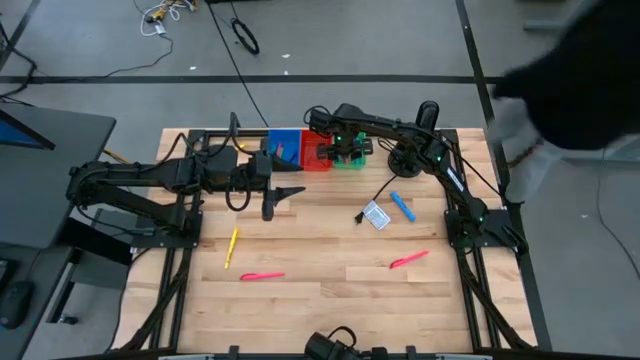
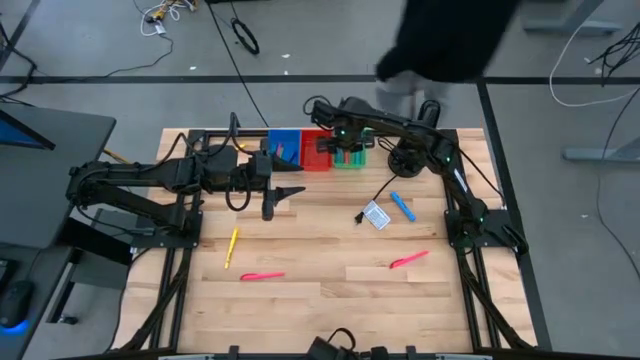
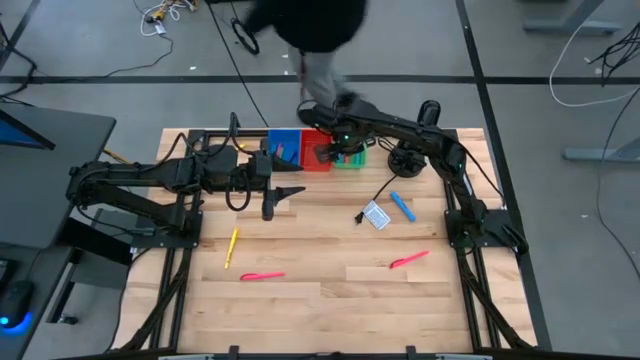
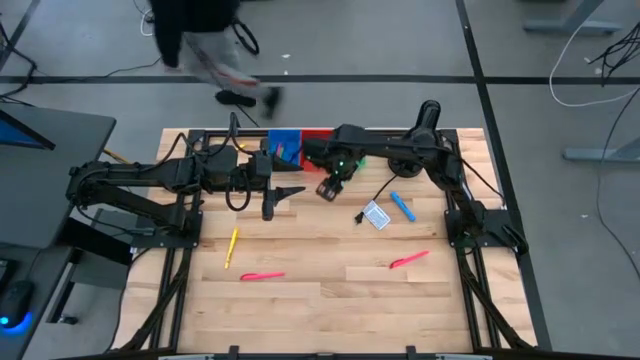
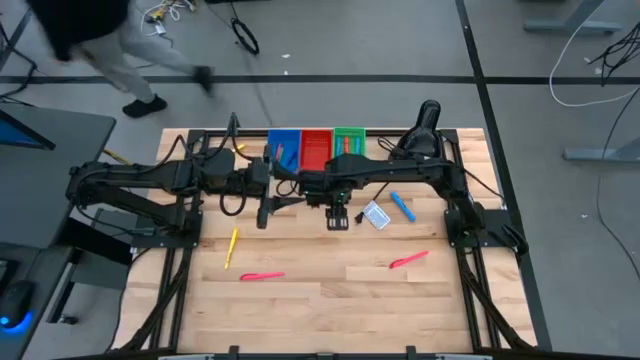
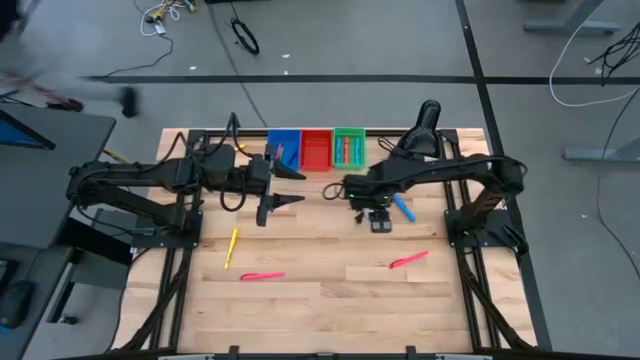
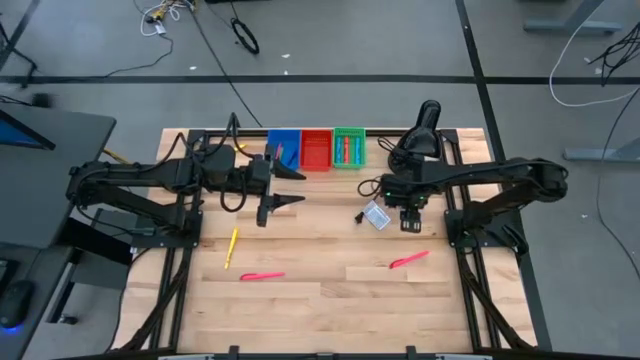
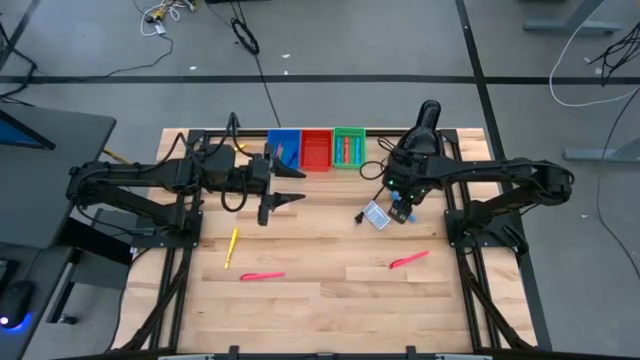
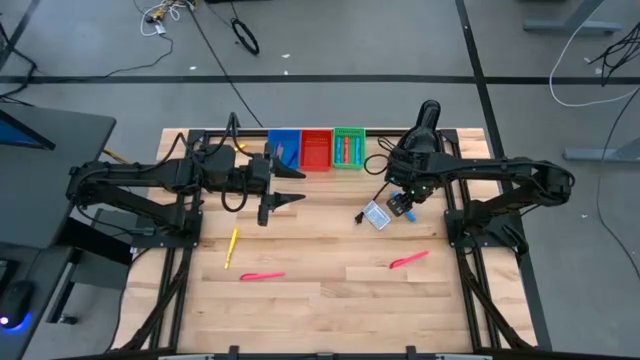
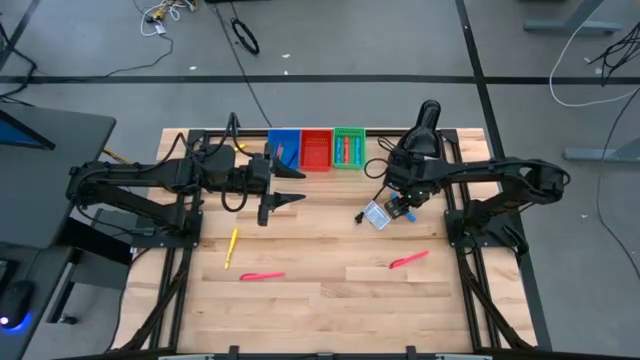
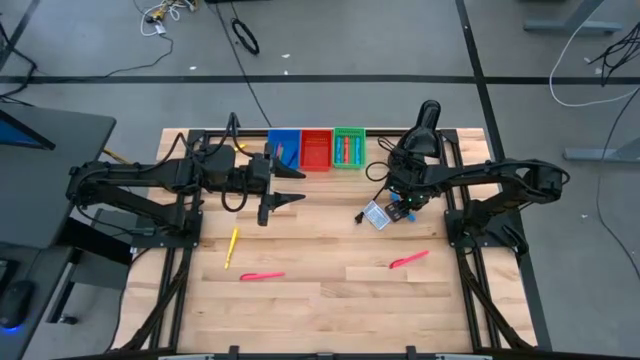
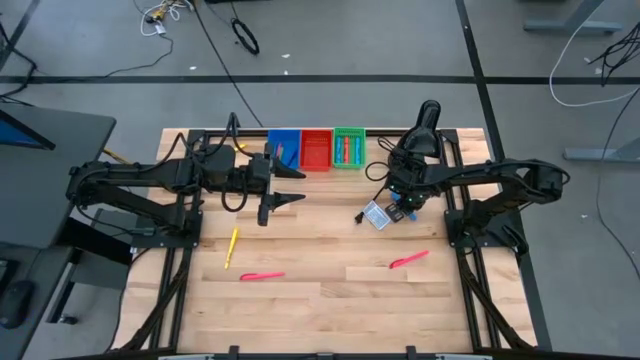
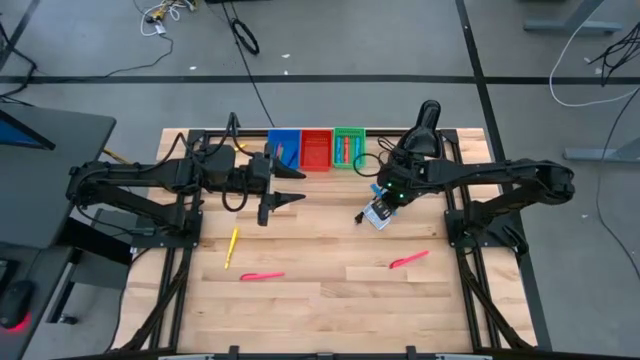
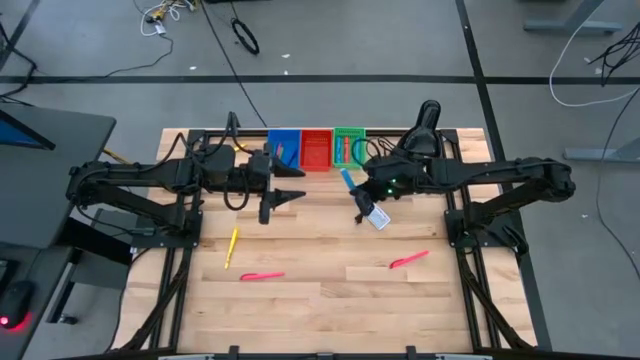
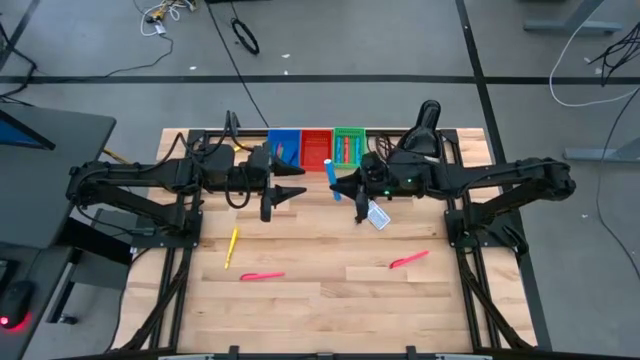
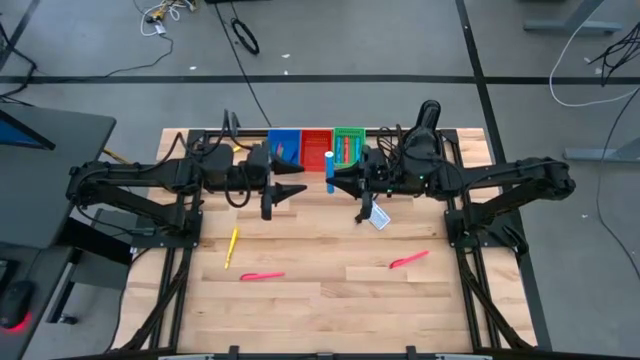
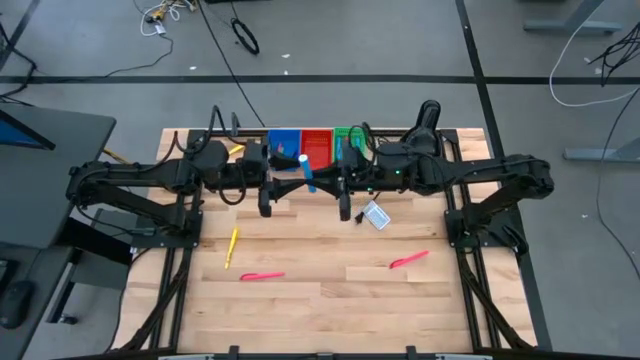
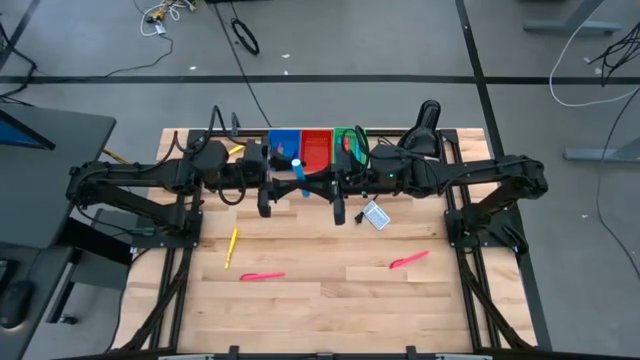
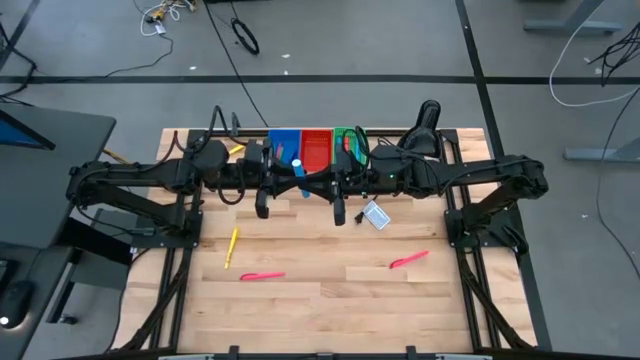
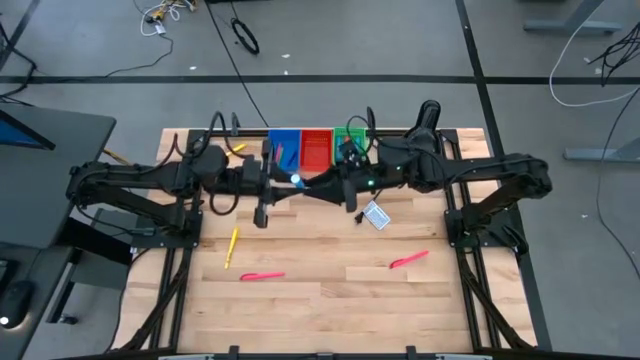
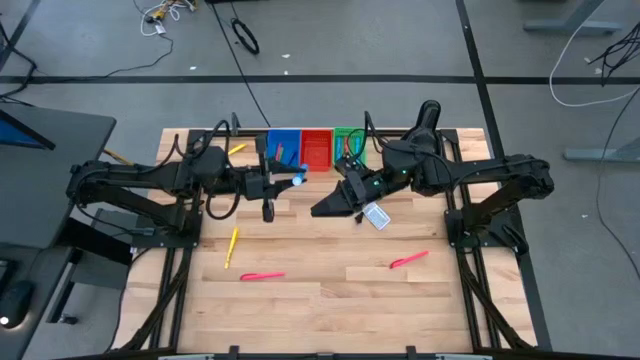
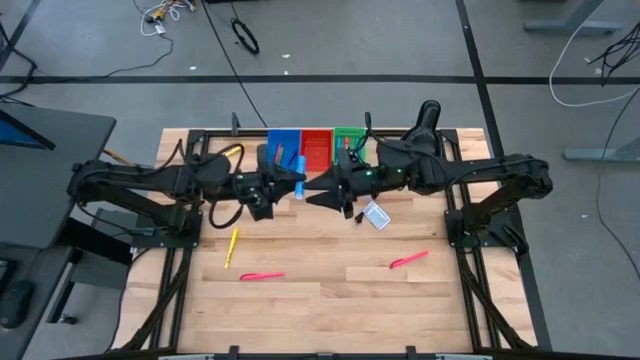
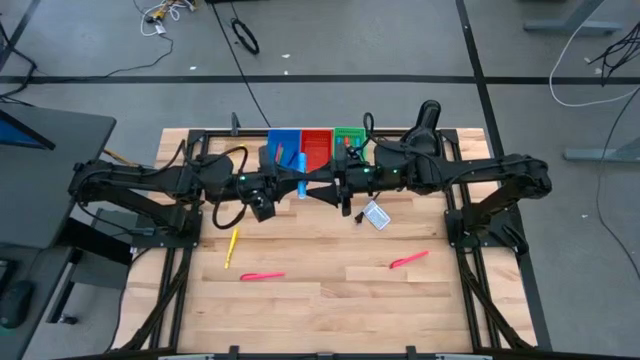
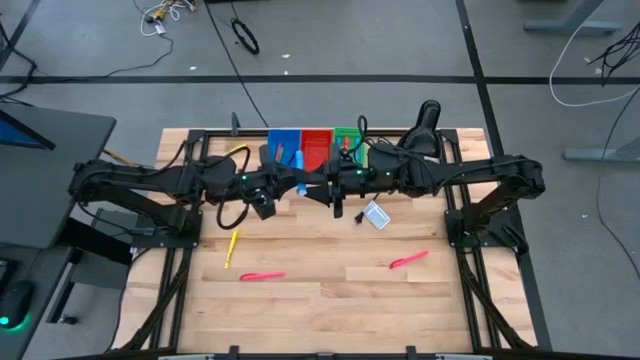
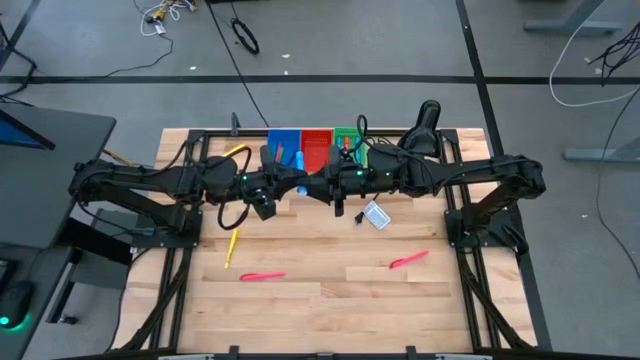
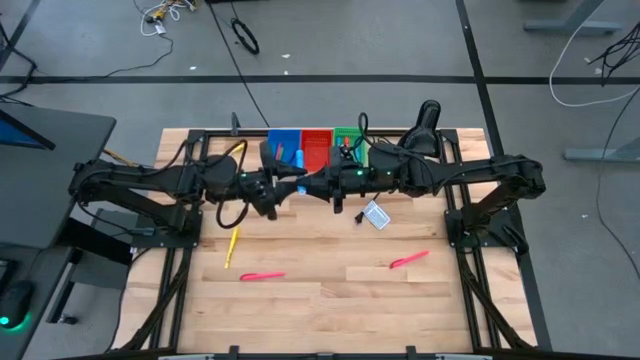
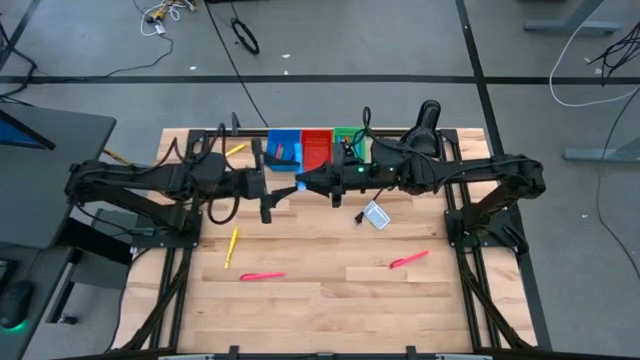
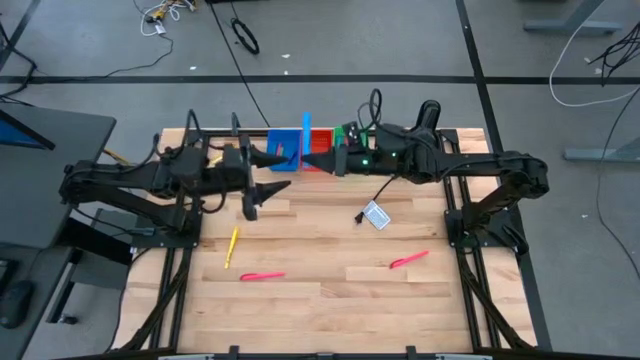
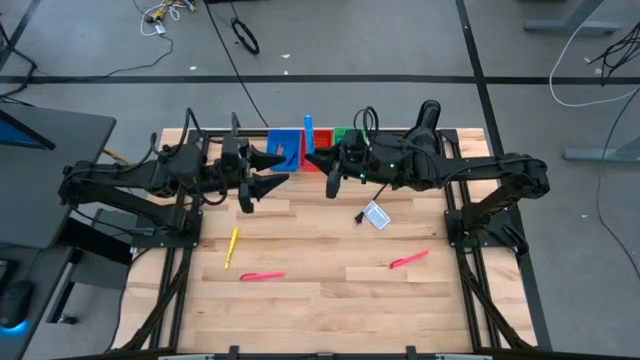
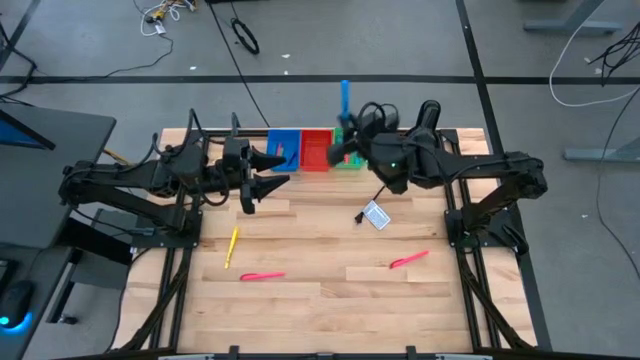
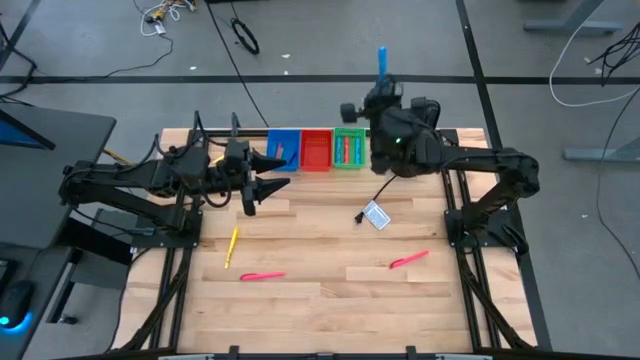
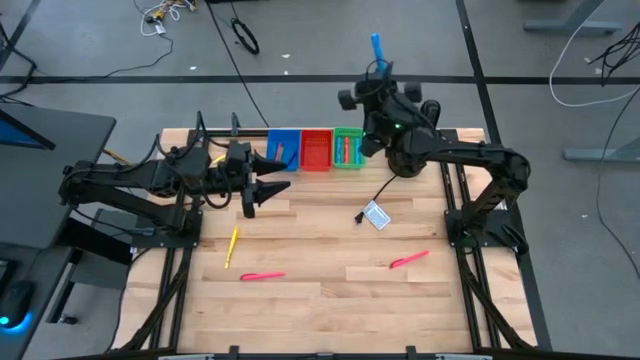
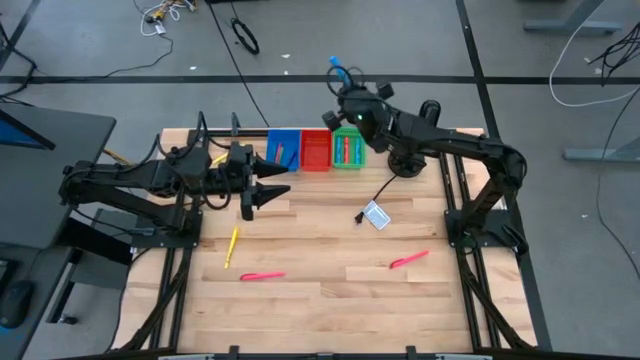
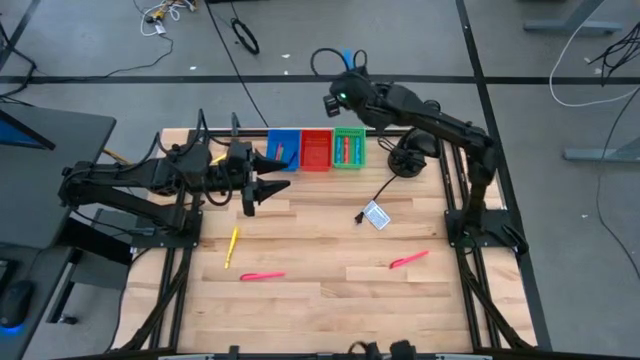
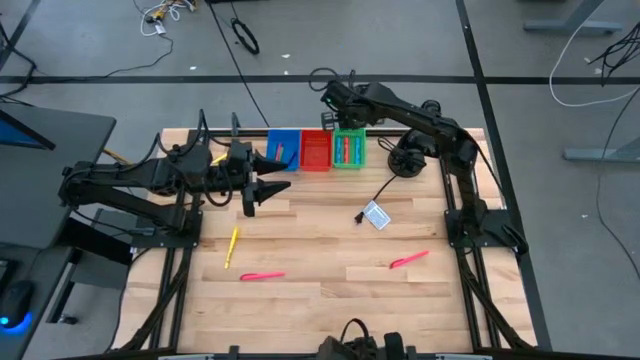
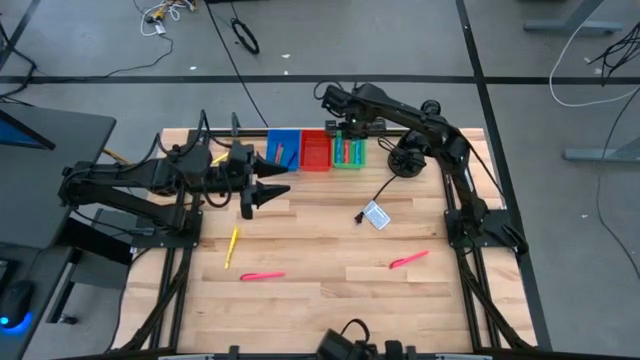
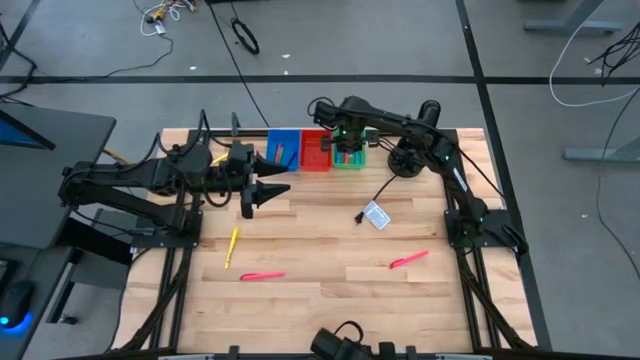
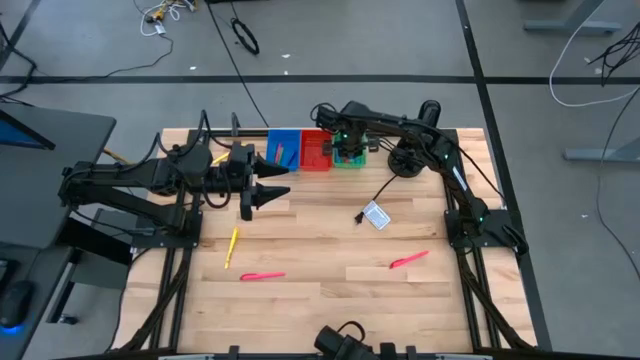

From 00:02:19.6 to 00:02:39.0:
Task: Pick & Place Markers
Put the blue highlighter into the green bin

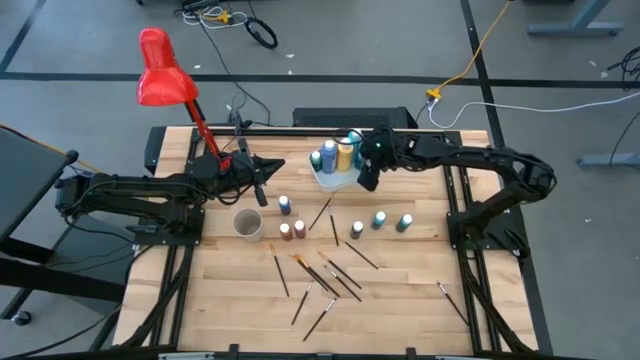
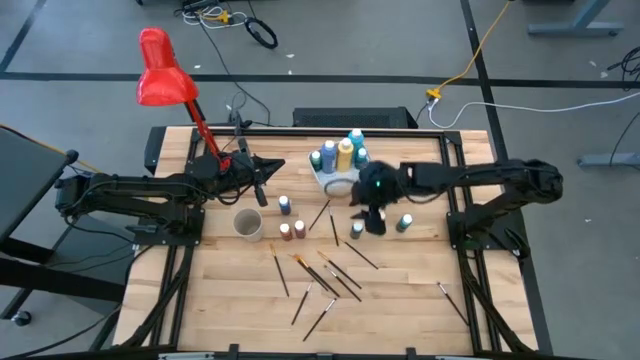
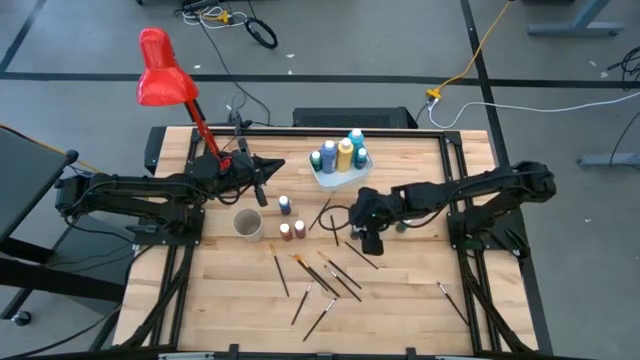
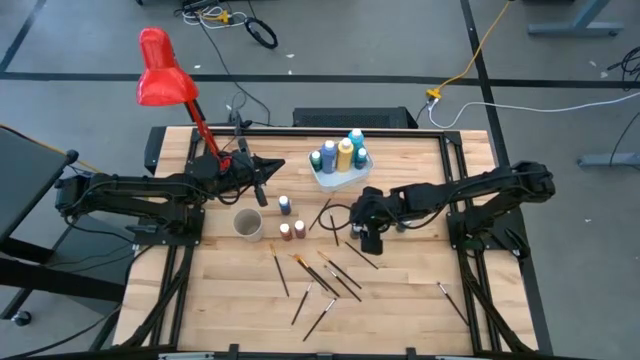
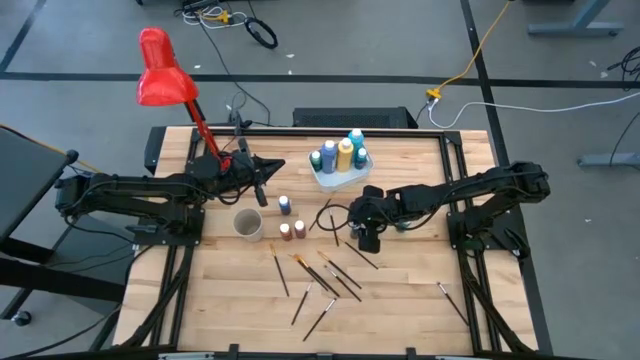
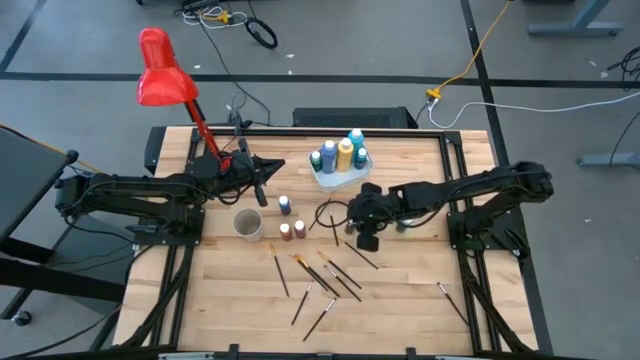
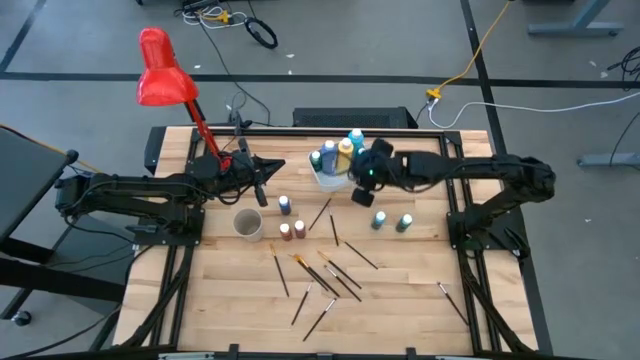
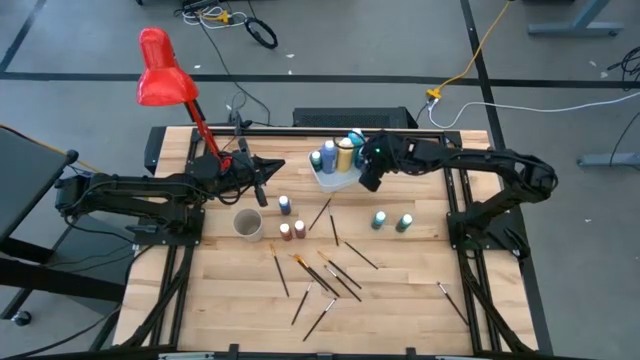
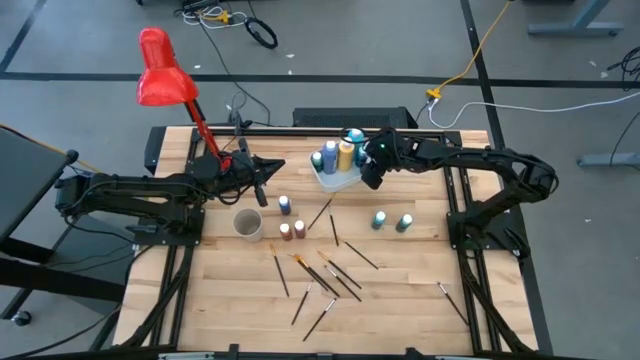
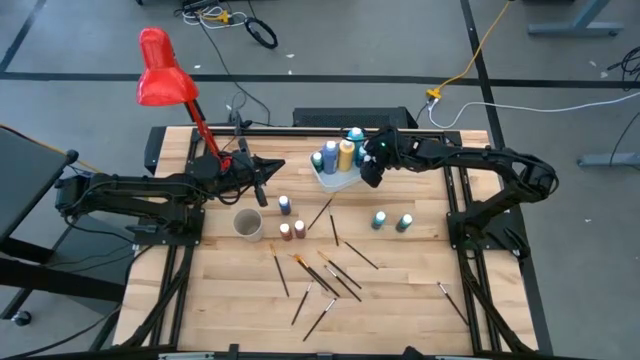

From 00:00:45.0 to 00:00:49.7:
Task: Pick & Place Paint Supplies
Put the small black paint bottle into the white bin
